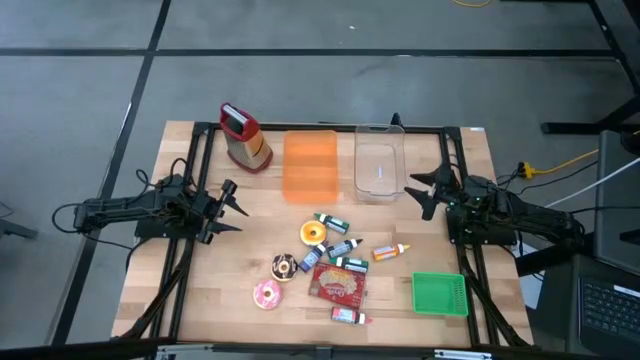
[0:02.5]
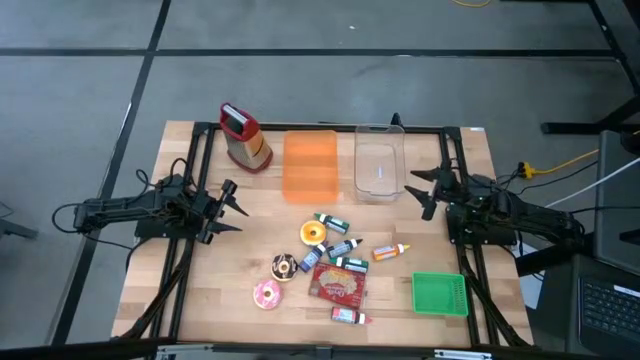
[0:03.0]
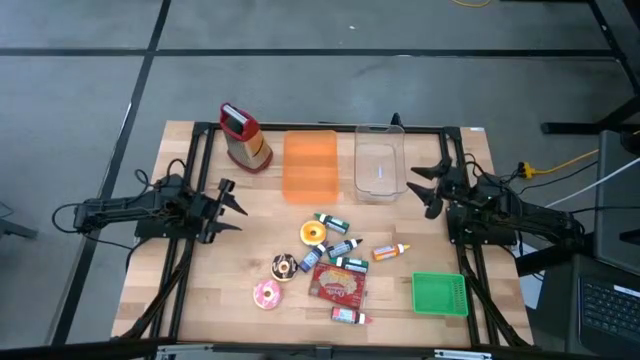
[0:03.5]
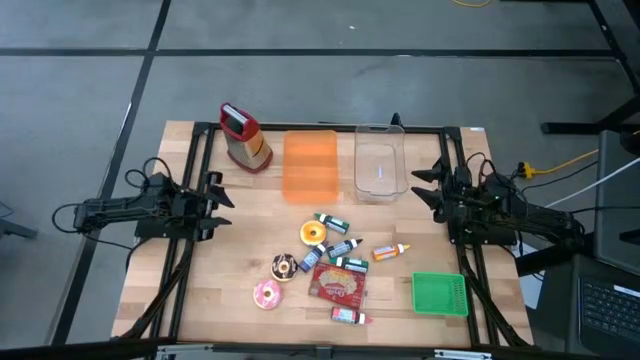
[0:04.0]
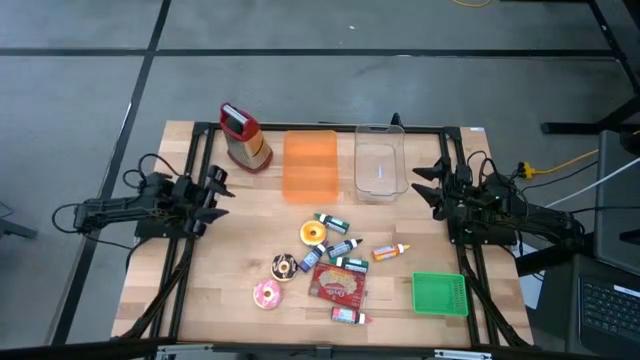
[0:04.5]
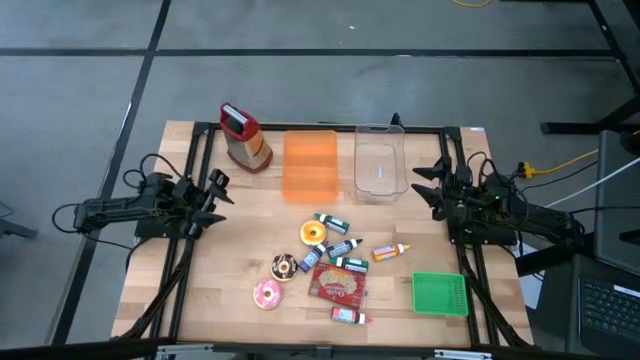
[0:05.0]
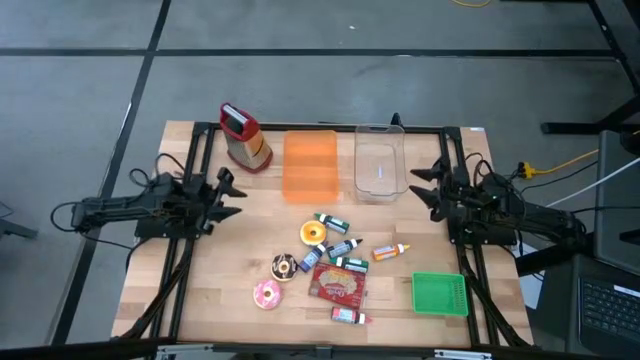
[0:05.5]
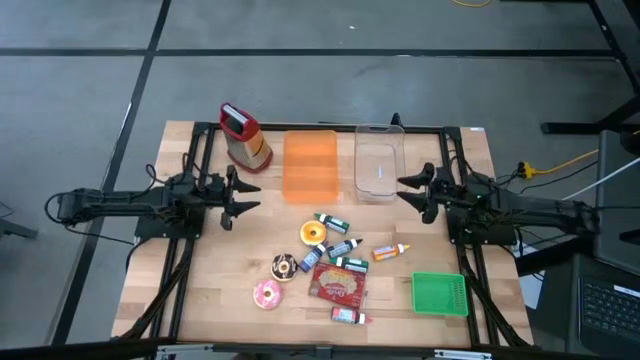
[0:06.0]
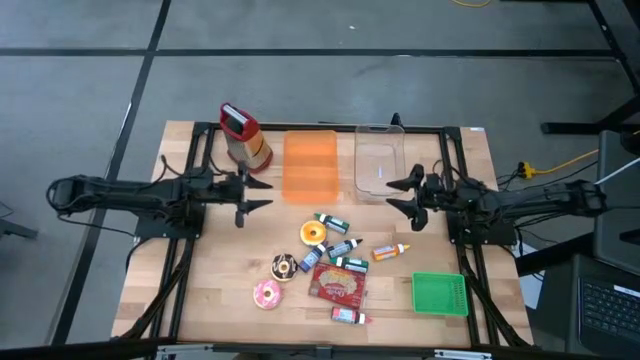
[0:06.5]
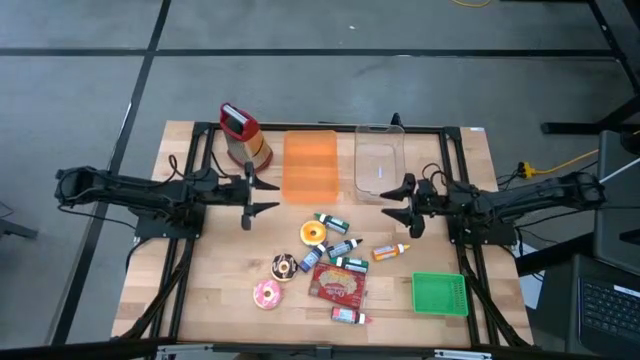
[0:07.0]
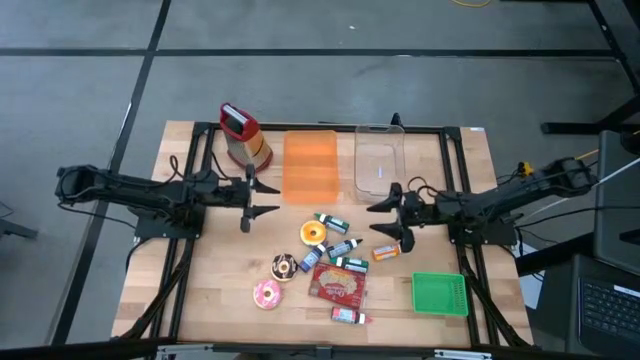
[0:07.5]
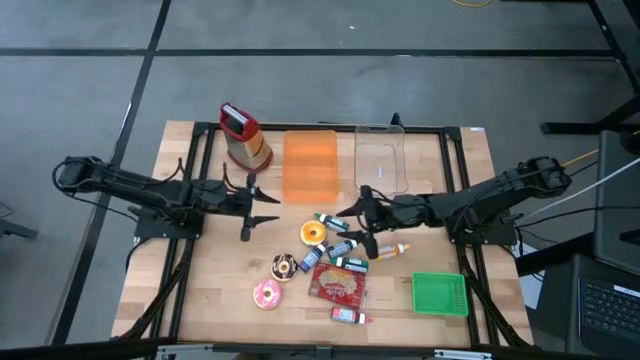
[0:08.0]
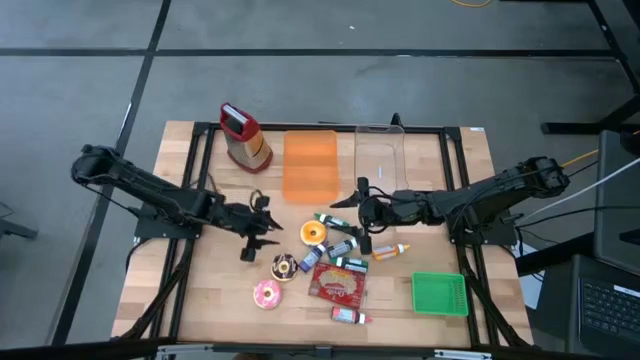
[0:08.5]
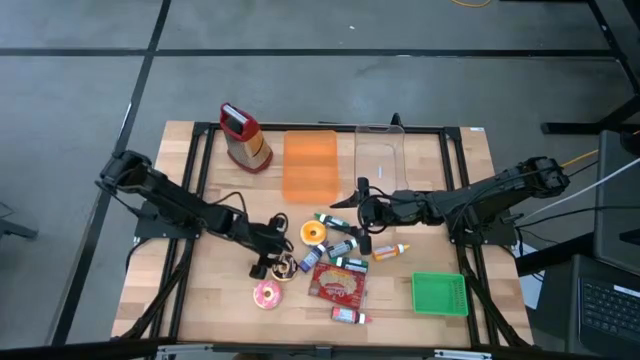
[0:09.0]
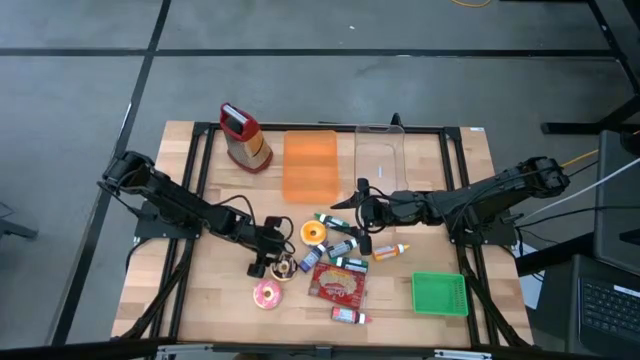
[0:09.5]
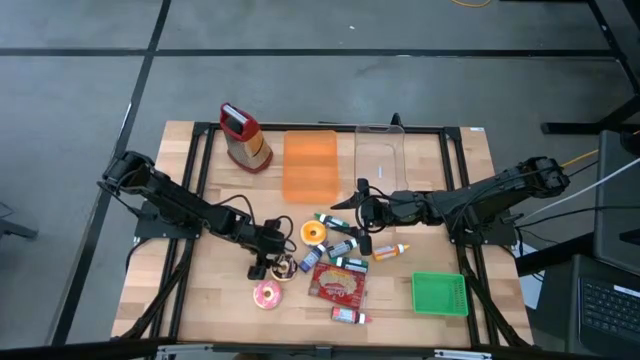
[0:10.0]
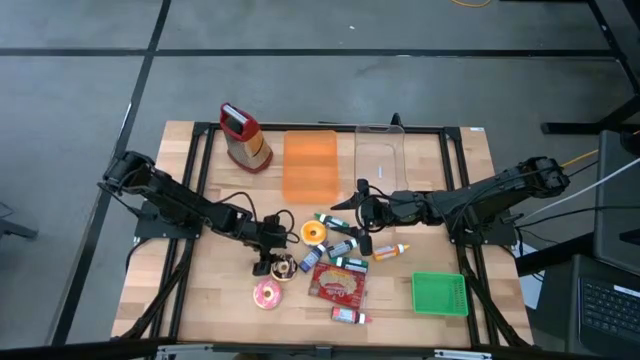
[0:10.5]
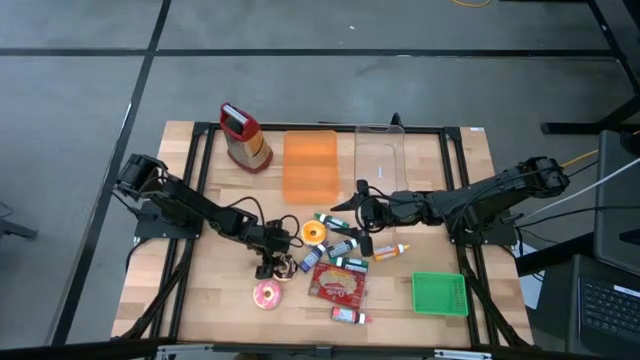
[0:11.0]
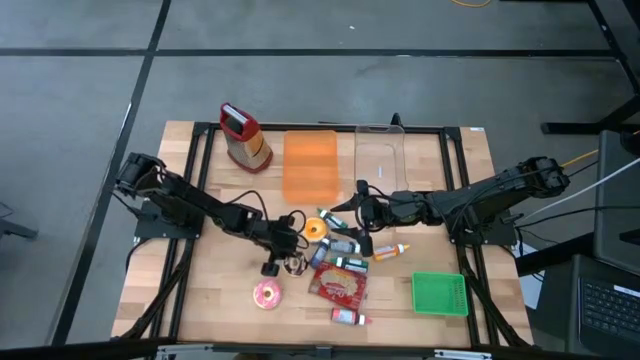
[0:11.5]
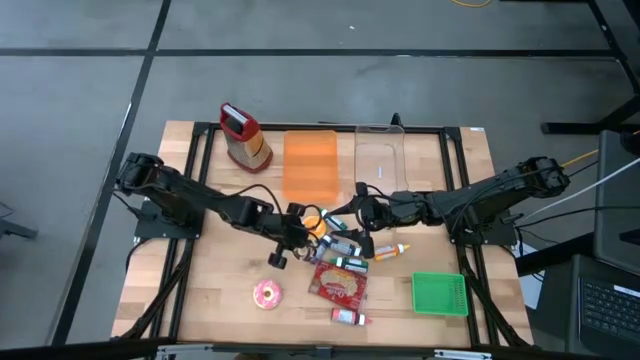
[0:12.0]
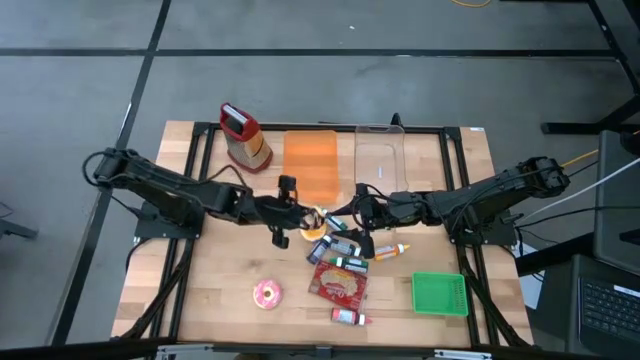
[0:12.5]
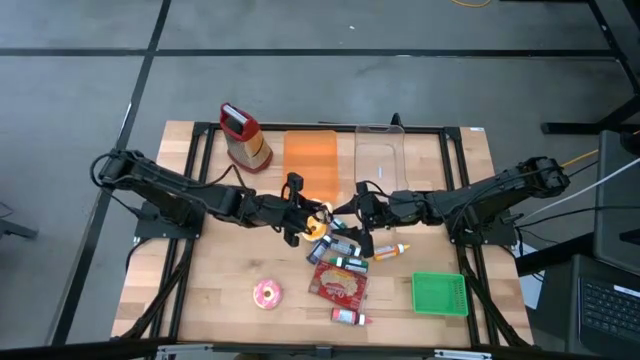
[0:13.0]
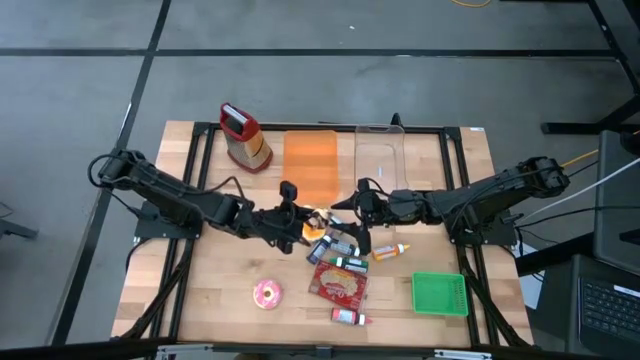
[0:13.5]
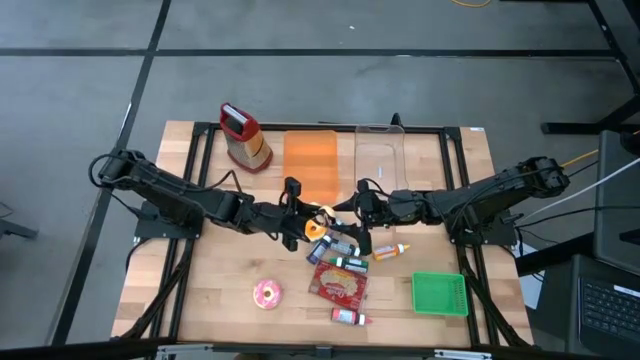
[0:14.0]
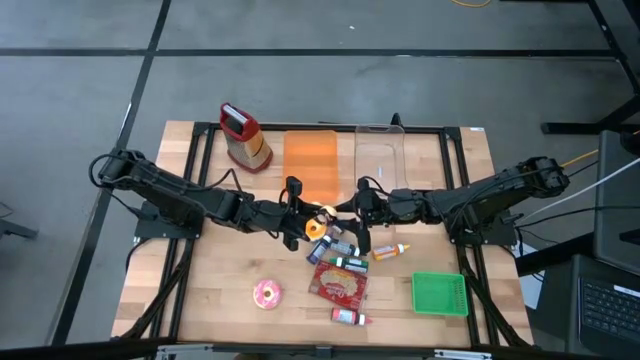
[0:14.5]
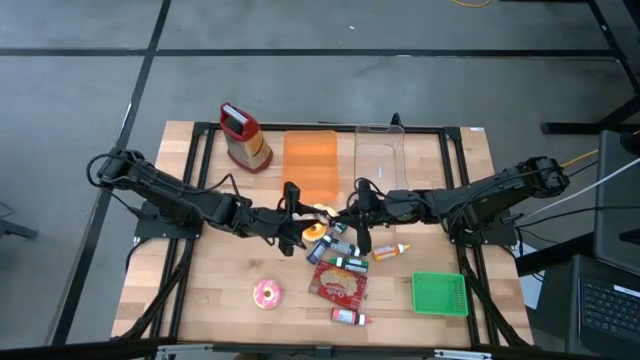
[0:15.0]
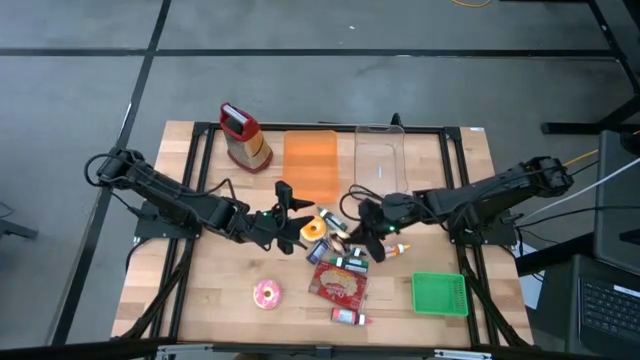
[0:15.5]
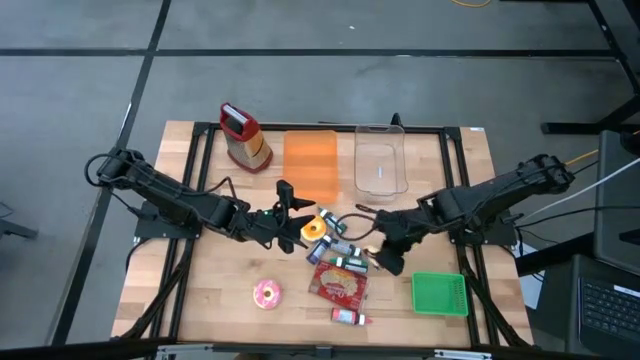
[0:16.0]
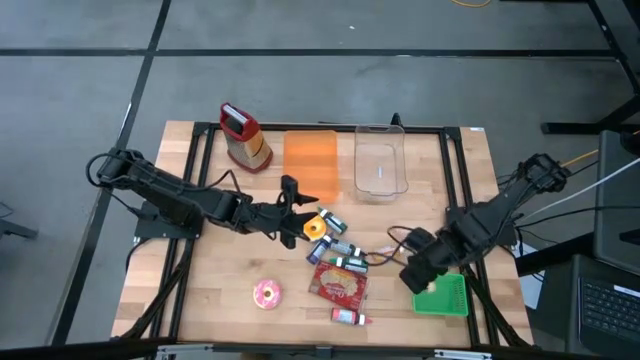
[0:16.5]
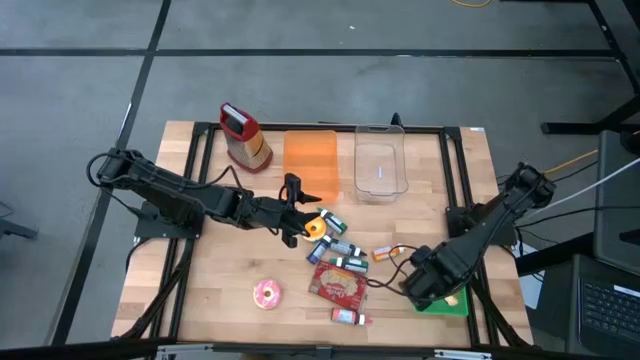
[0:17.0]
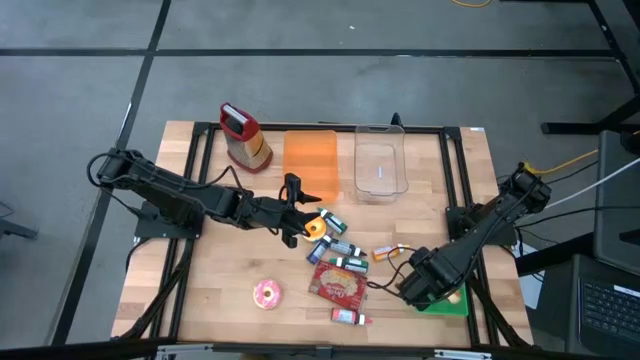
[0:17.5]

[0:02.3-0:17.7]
Put the black doughnut into the green bin

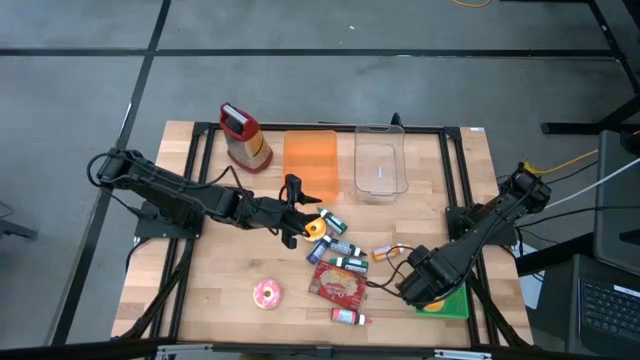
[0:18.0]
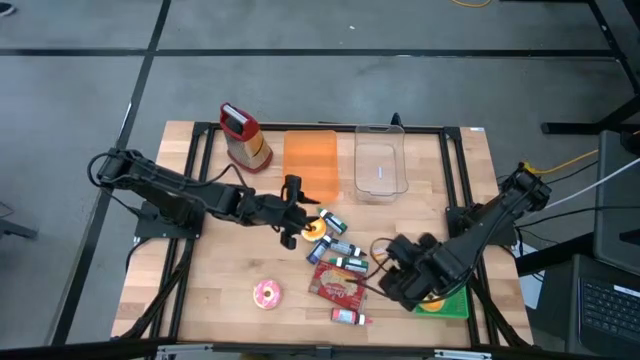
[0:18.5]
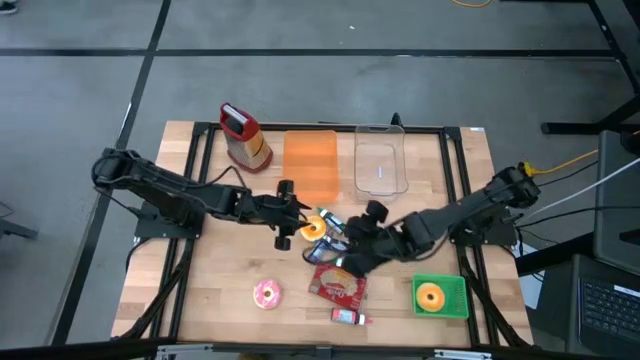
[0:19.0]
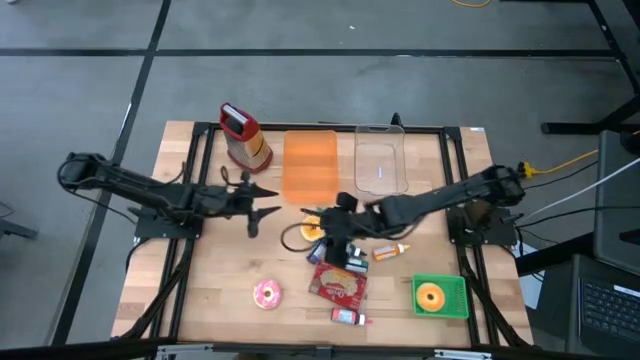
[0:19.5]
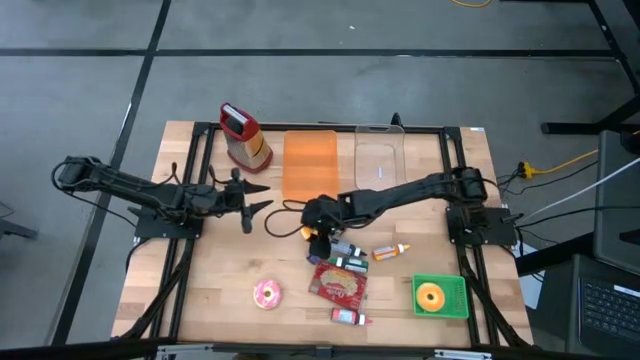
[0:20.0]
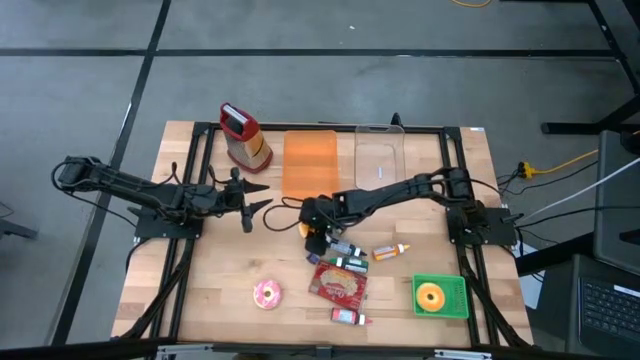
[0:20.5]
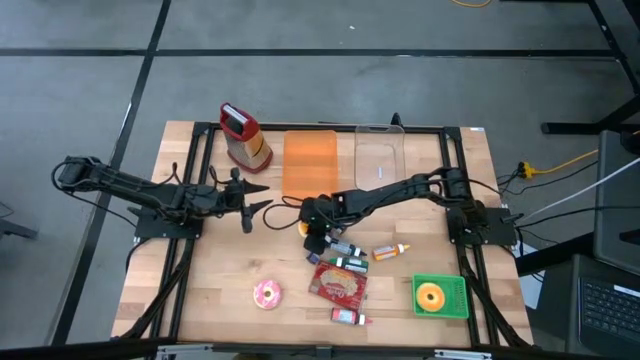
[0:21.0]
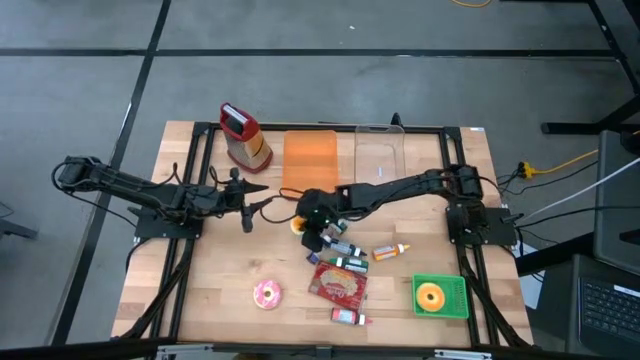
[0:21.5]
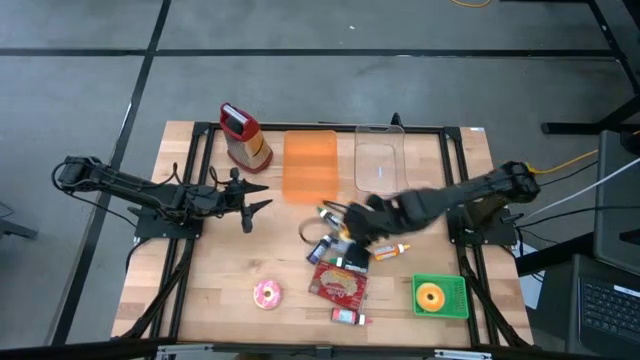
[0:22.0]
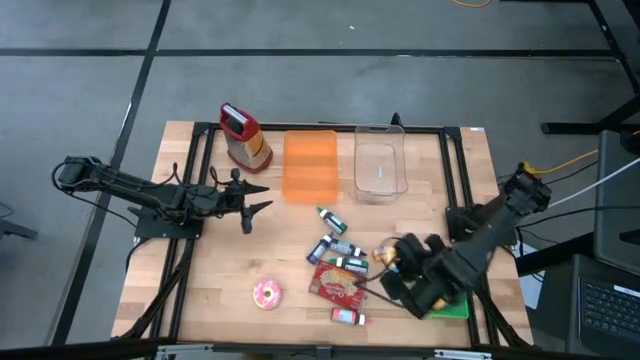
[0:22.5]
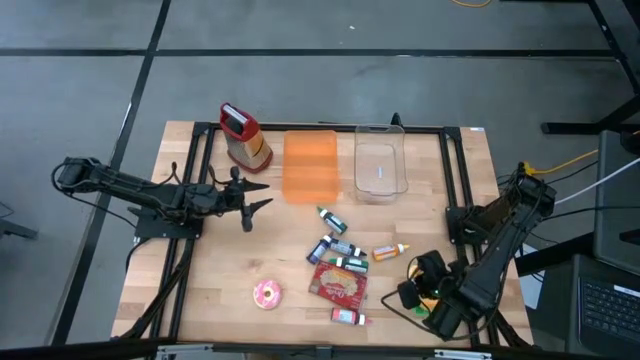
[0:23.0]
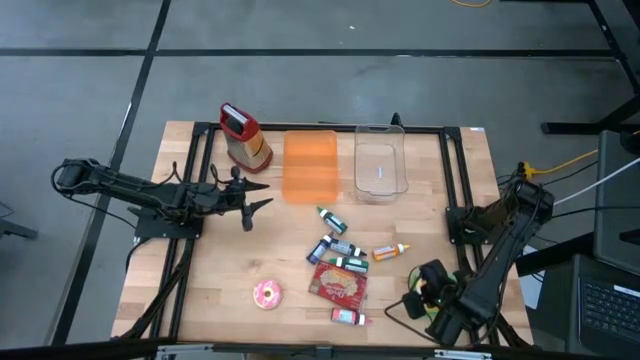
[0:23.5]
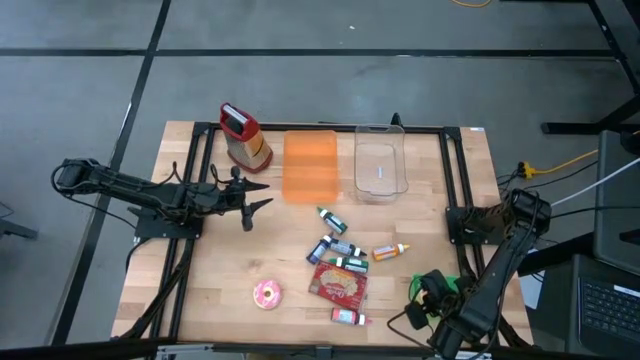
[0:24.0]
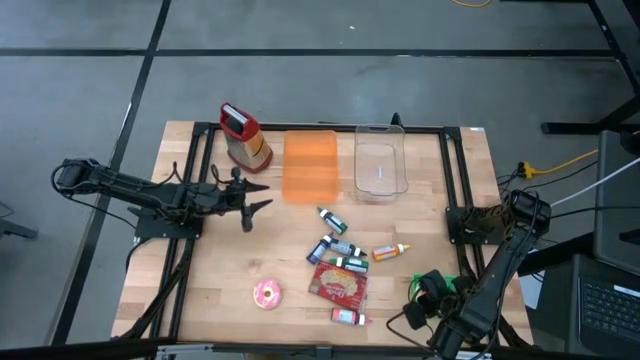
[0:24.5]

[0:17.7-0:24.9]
Put the blue rubber doughnut into the green bin
